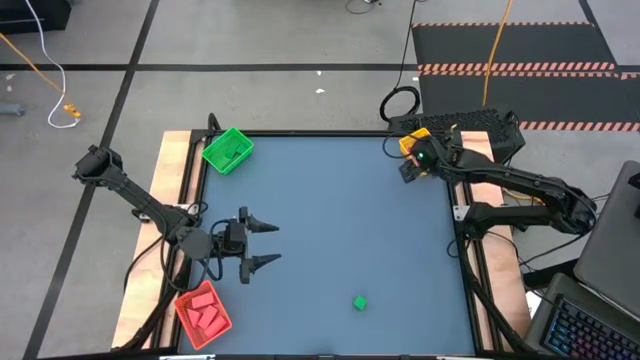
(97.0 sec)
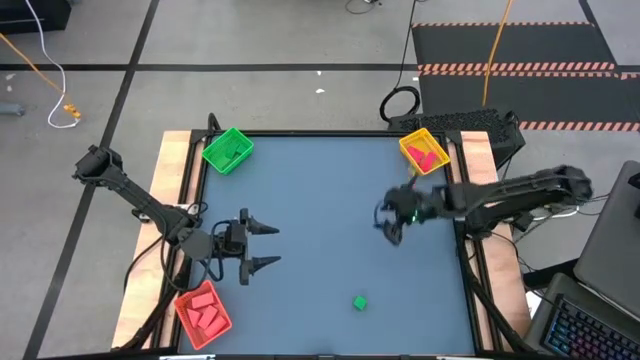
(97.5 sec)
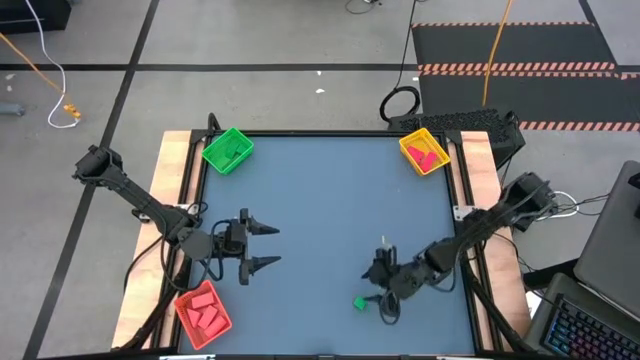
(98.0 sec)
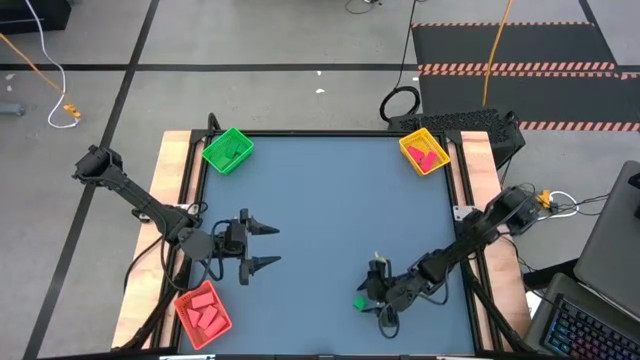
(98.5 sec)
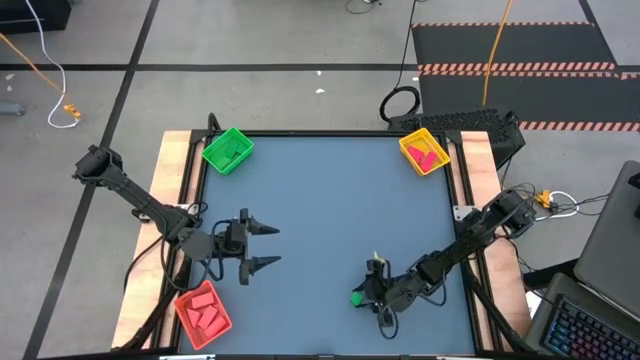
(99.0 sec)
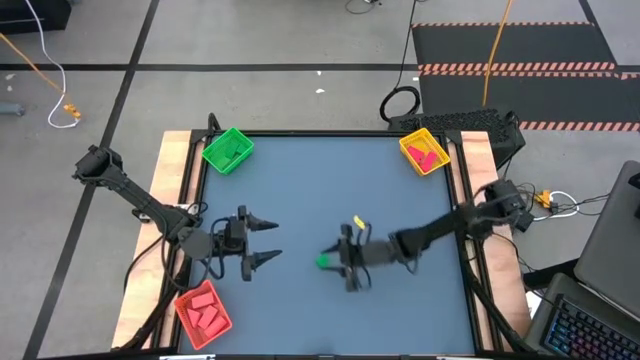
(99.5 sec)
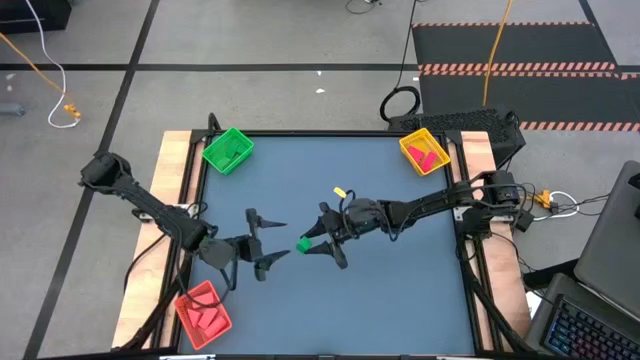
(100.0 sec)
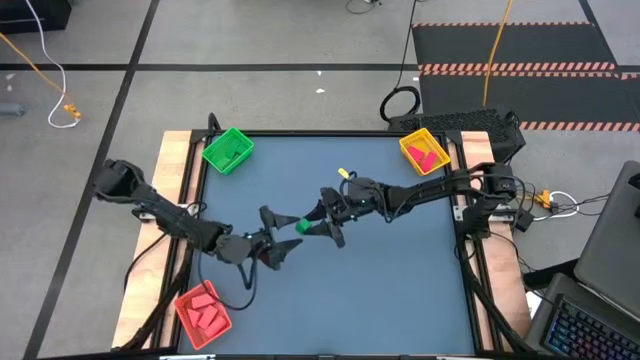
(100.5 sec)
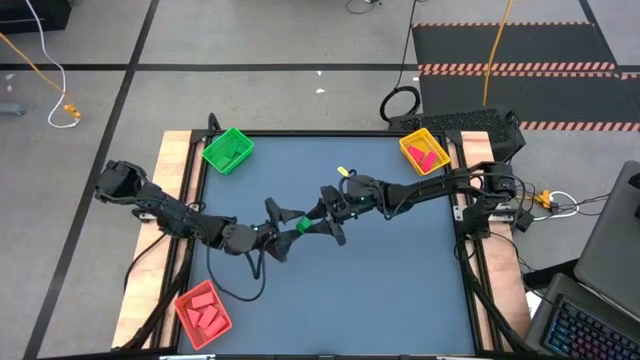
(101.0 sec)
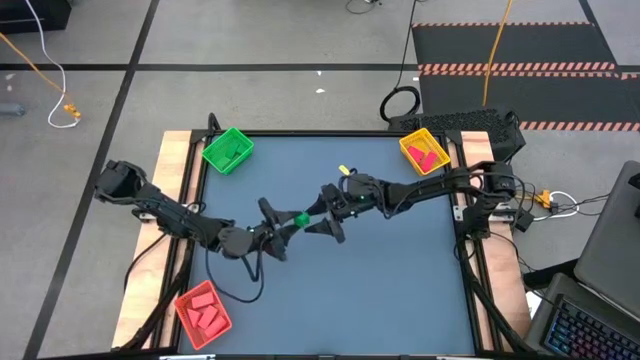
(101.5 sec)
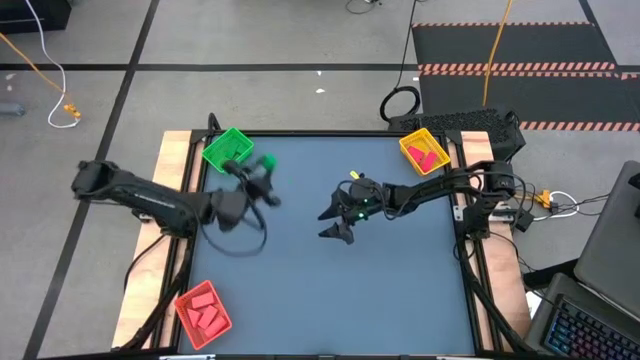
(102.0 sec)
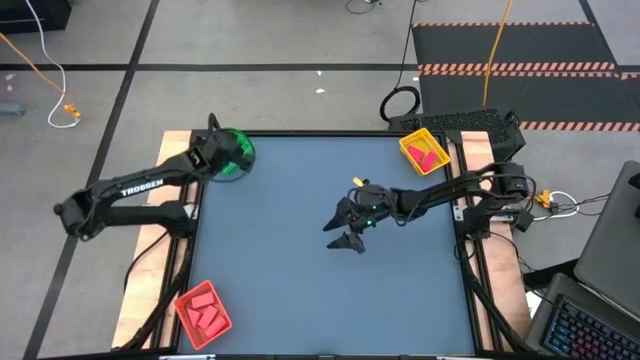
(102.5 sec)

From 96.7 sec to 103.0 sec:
Task: Sort & place blocks by color
Put the green block into the green bin

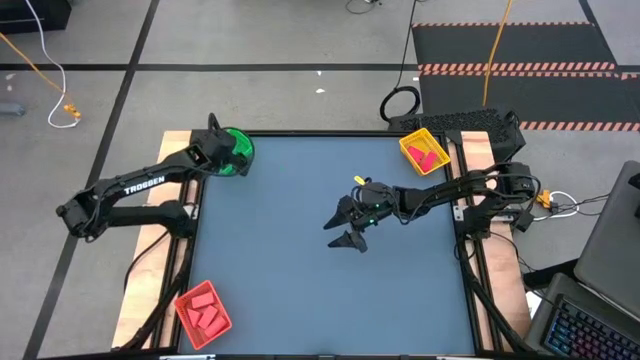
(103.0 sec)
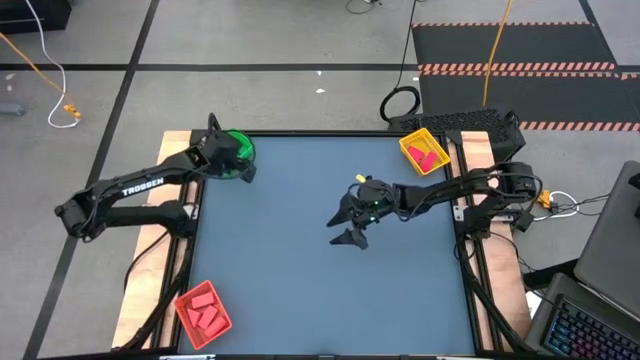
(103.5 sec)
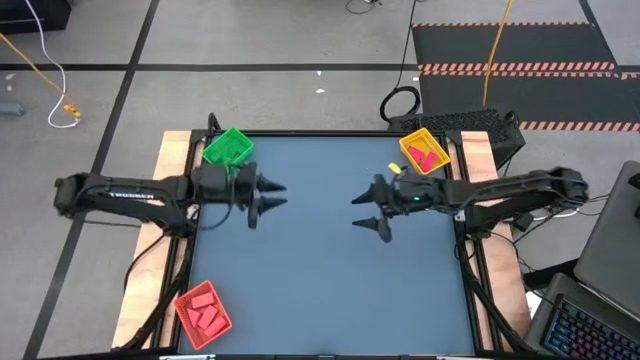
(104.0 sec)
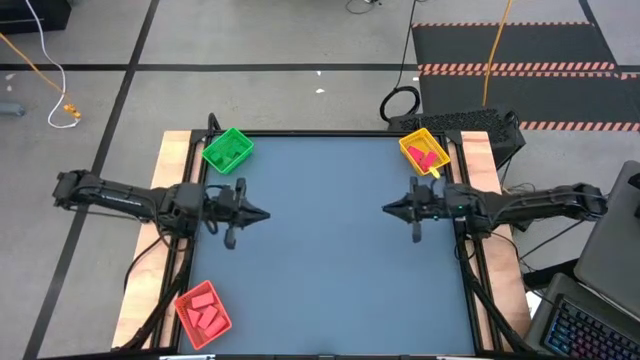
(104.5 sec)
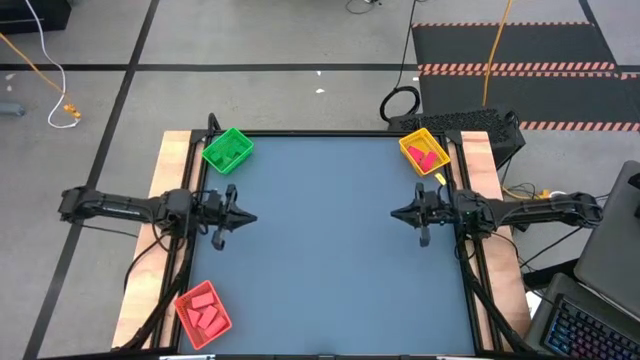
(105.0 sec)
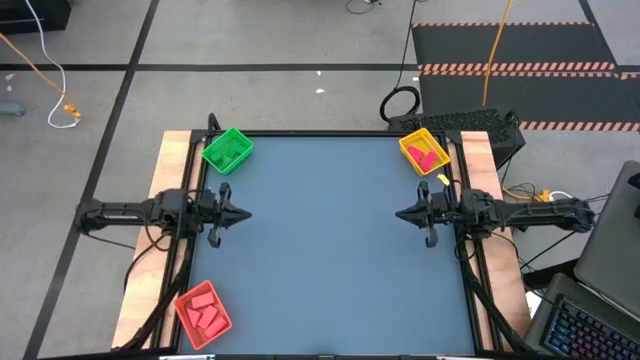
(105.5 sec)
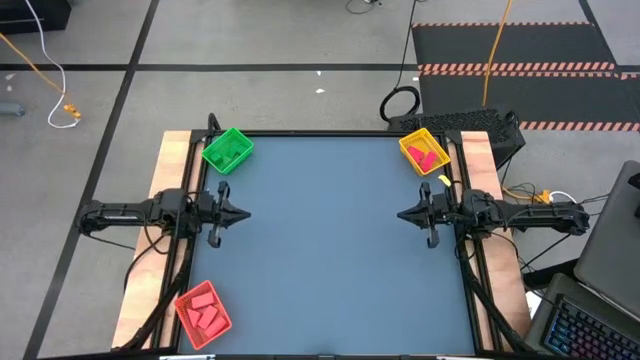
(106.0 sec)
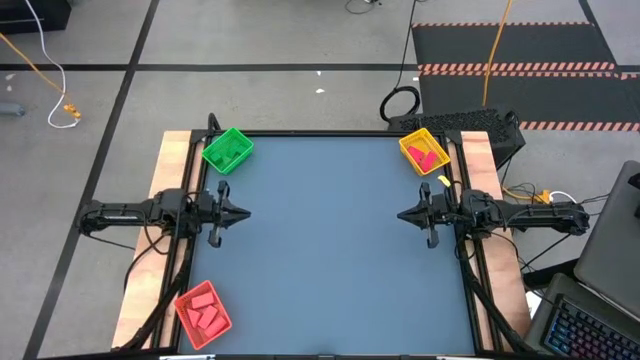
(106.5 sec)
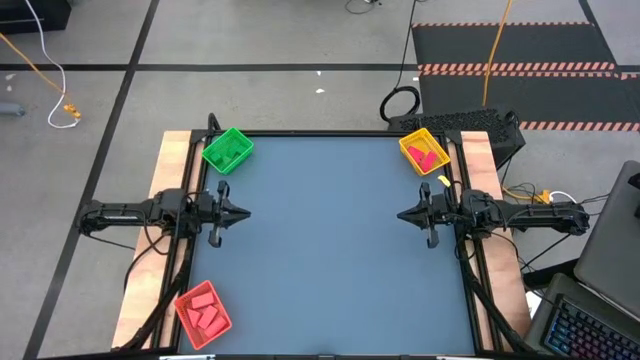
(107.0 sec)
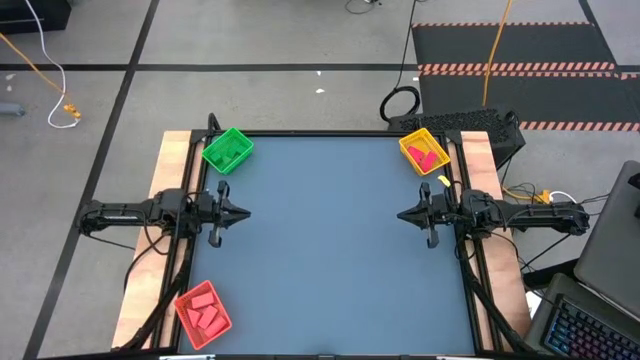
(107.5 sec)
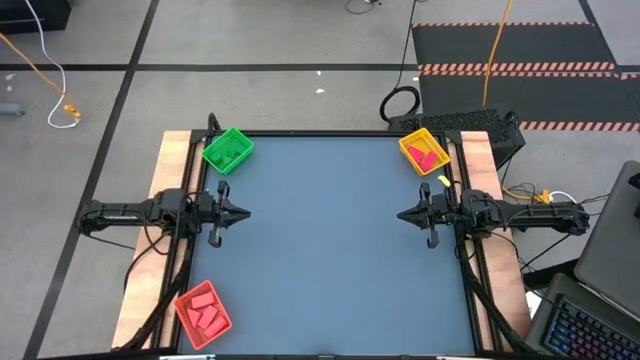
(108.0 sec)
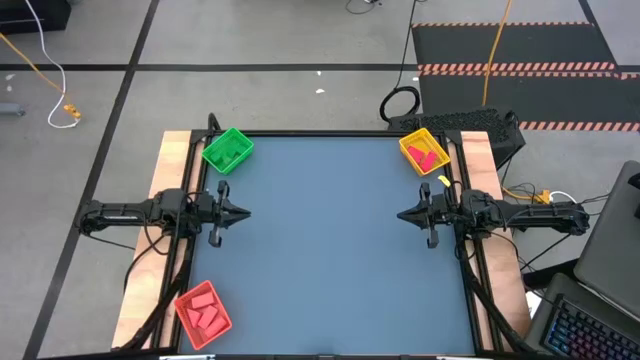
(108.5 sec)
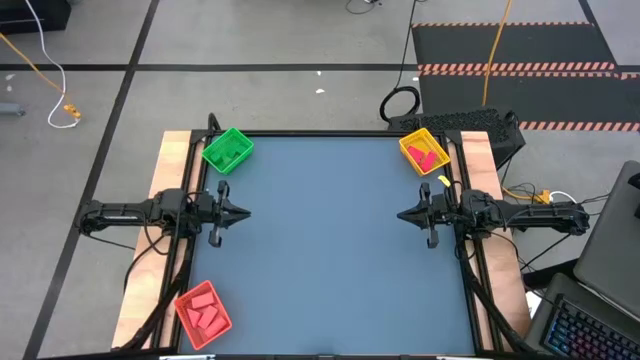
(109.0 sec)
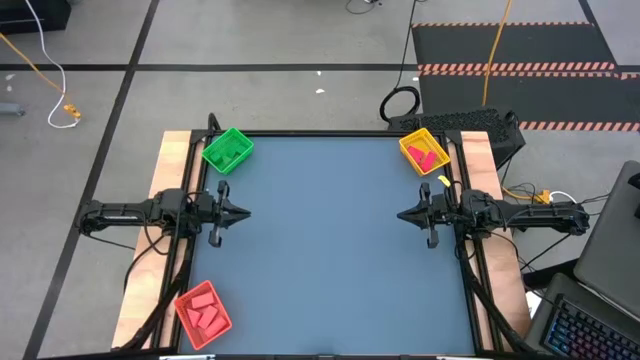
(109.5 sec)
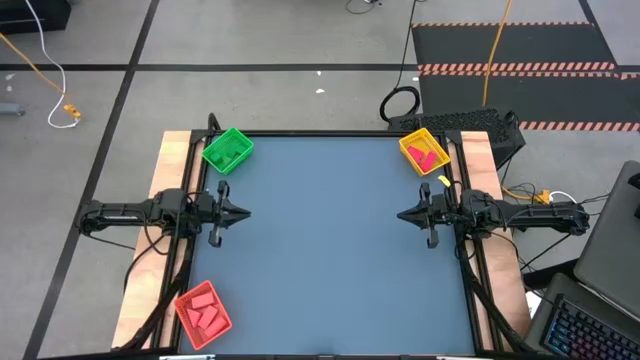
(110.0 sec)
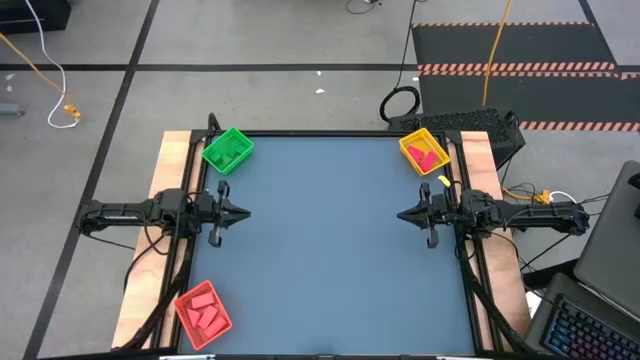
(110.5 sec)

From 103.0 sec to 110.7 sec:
Return to Home Position

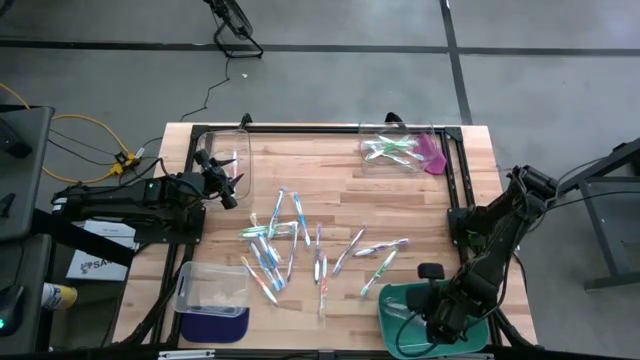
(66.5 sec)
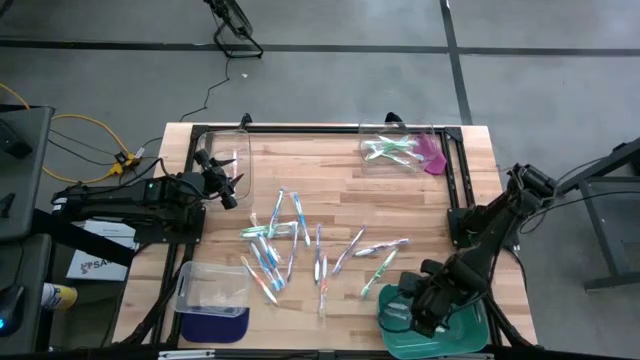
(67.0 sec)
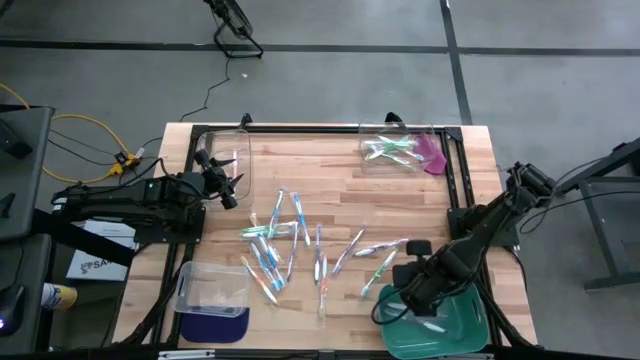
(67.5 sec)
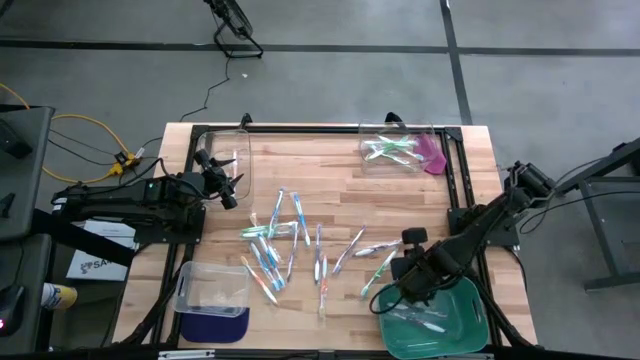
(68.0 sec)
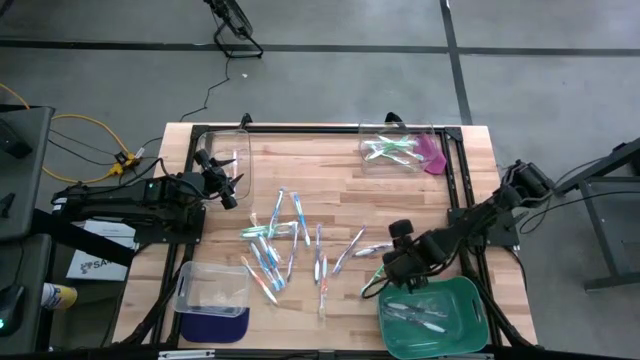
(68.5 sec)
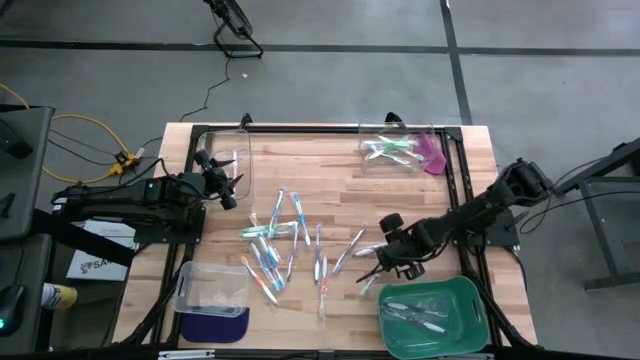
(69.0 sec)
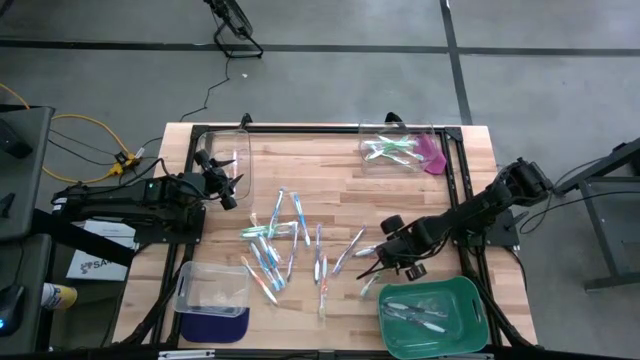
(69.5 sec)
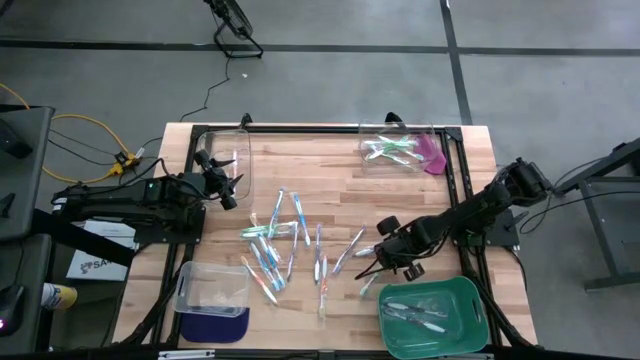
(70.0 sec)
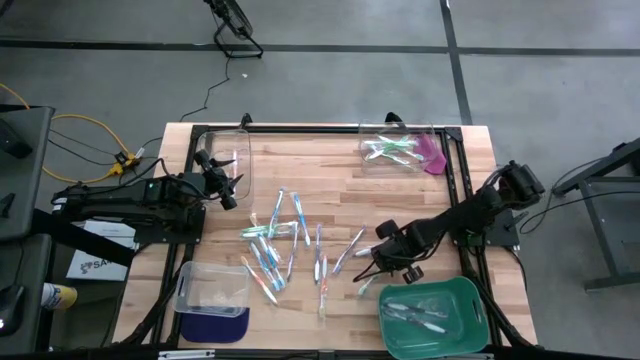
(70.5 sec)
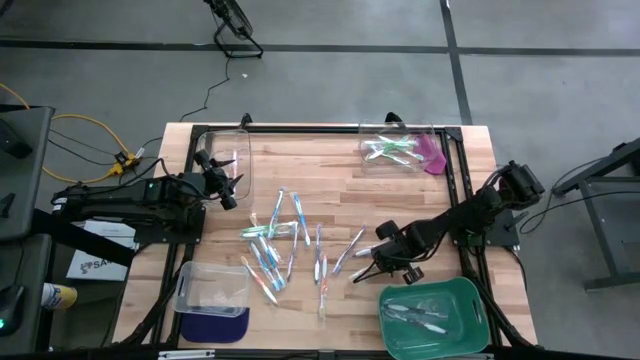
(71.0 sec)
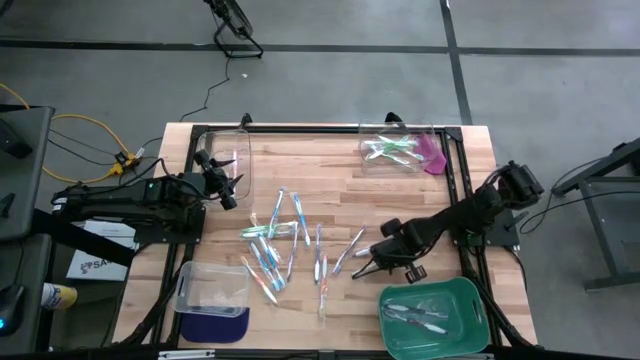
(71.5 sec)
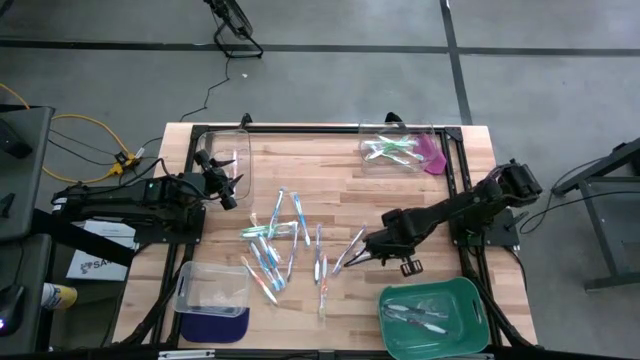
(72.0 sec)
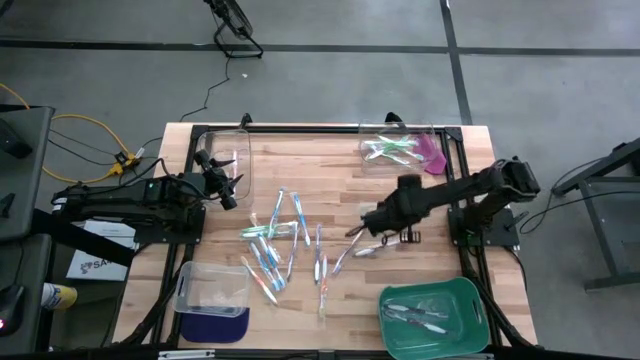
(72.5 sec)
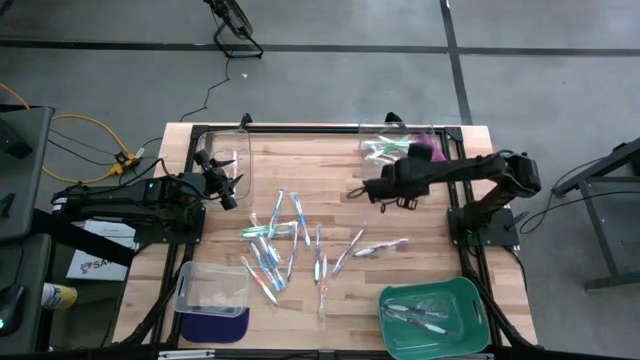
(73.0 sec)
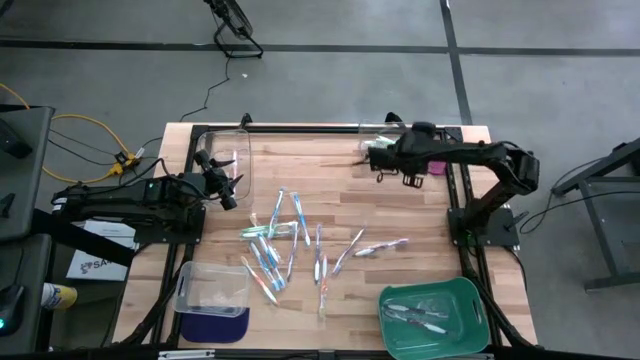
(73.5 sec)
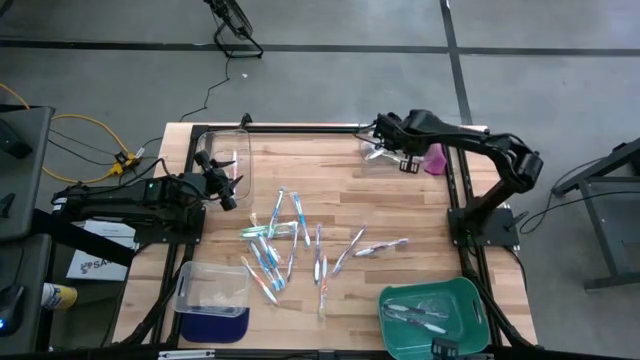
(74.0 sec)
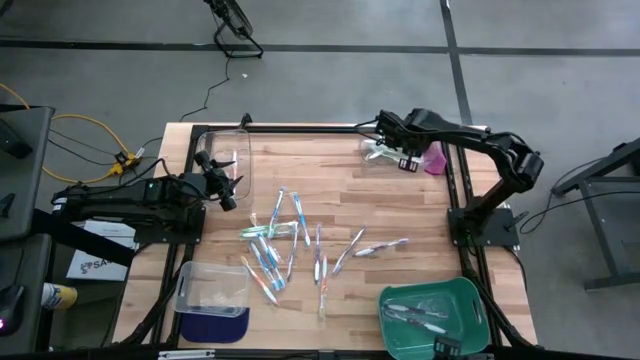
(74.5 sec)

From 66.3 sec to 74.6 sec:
Task: Pick & Place Toothbrushes
Put the green toothbrush into the top right transparent bin
